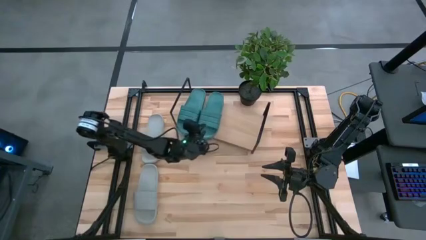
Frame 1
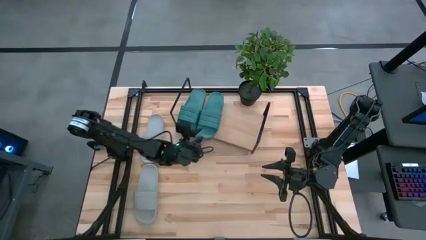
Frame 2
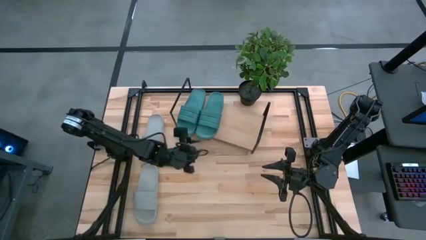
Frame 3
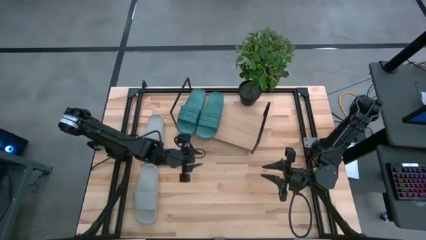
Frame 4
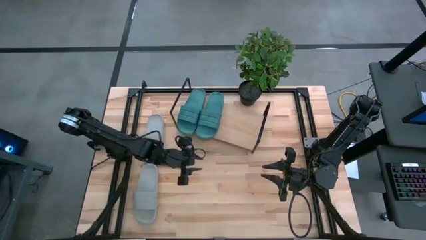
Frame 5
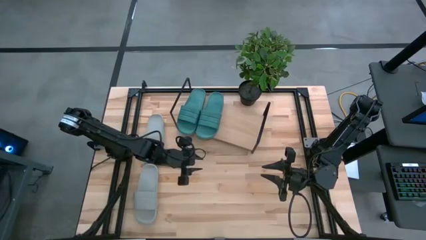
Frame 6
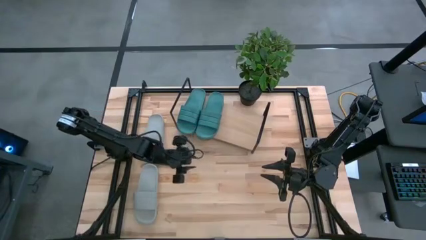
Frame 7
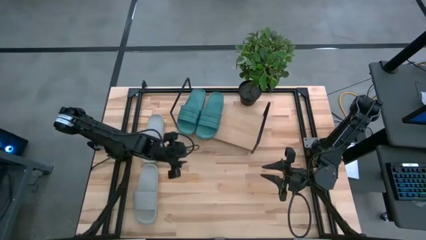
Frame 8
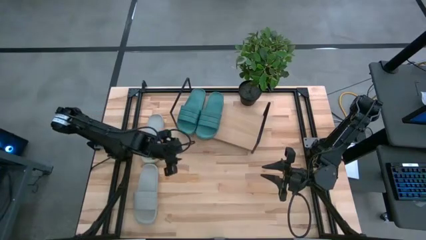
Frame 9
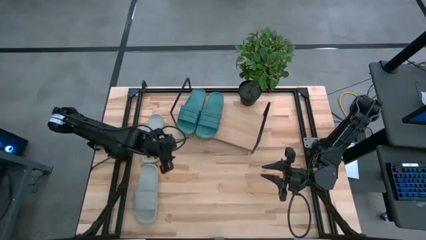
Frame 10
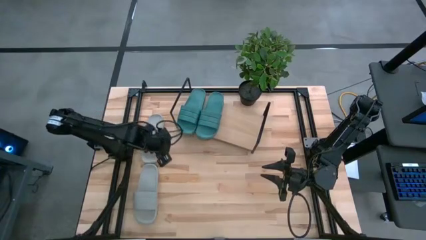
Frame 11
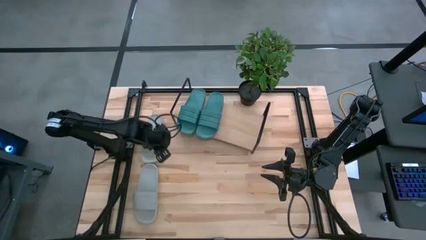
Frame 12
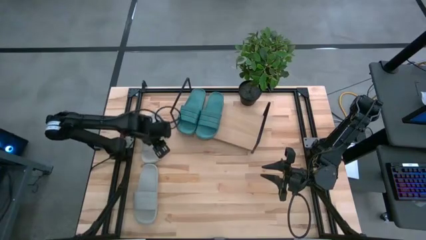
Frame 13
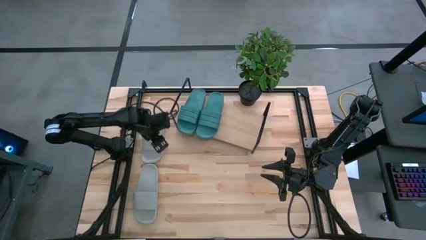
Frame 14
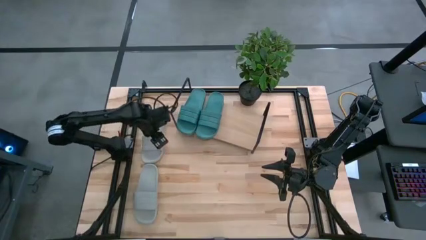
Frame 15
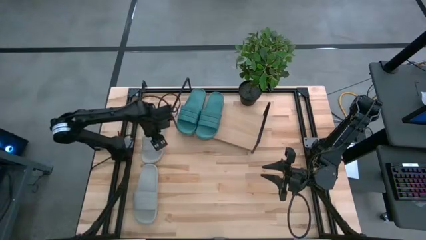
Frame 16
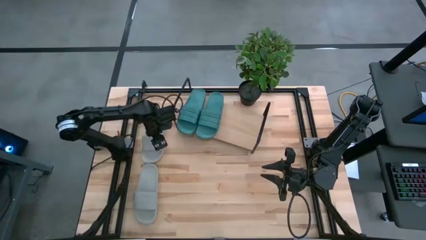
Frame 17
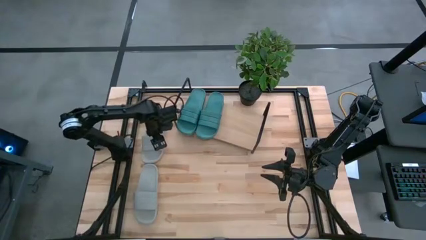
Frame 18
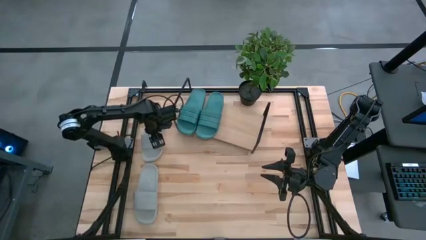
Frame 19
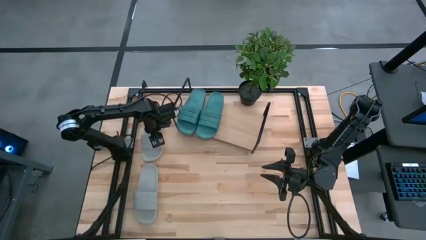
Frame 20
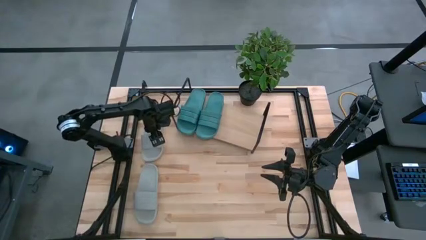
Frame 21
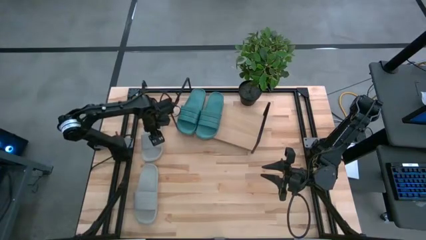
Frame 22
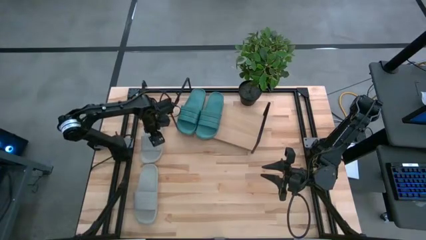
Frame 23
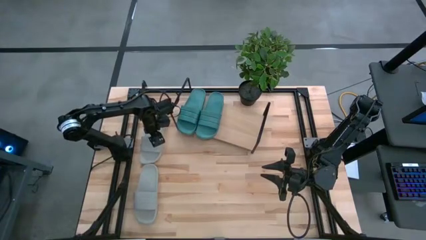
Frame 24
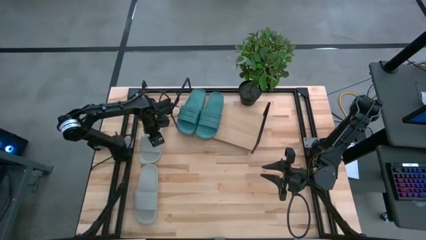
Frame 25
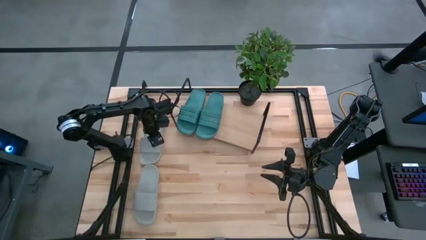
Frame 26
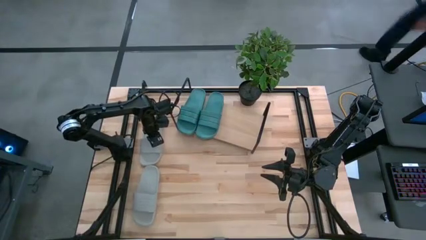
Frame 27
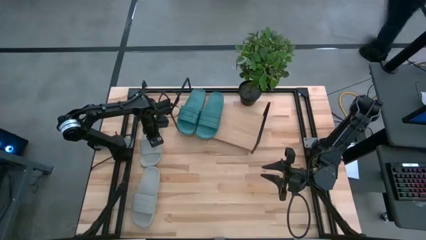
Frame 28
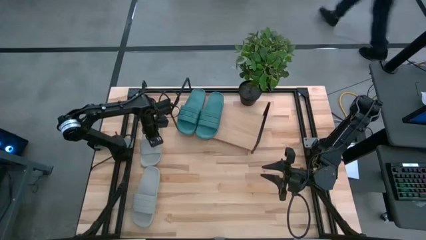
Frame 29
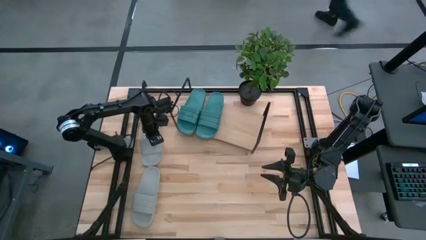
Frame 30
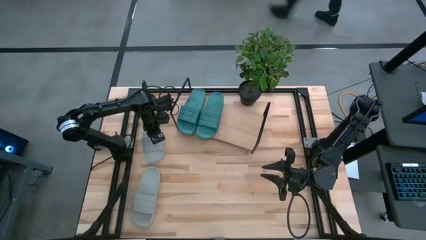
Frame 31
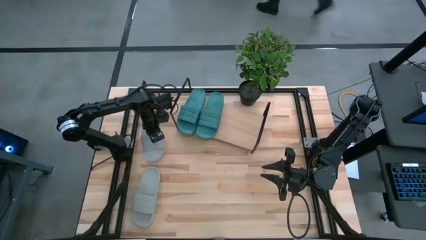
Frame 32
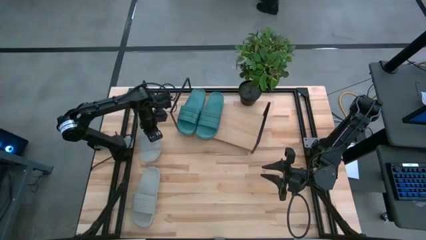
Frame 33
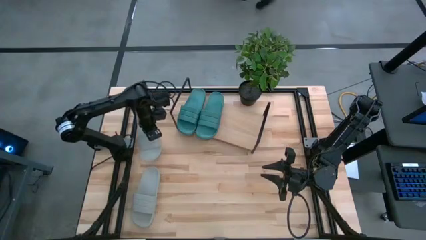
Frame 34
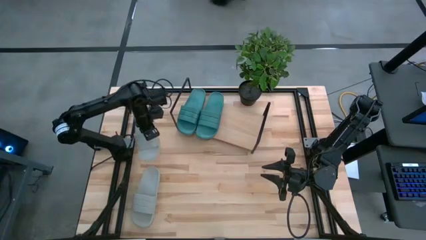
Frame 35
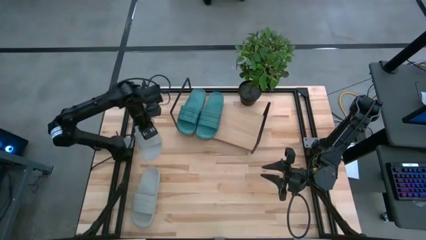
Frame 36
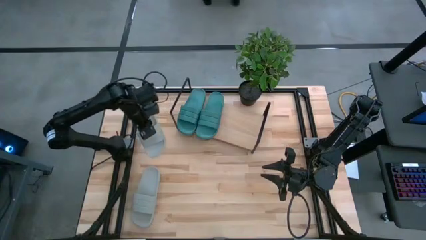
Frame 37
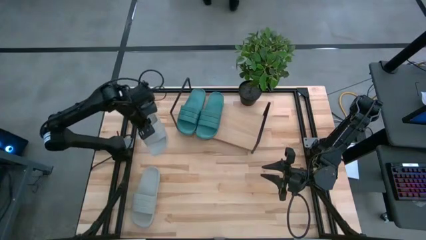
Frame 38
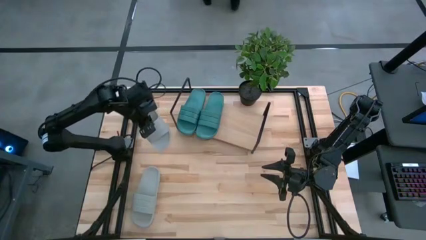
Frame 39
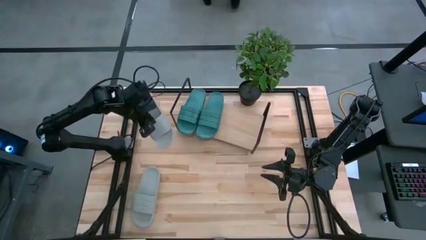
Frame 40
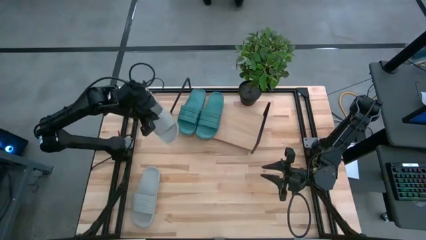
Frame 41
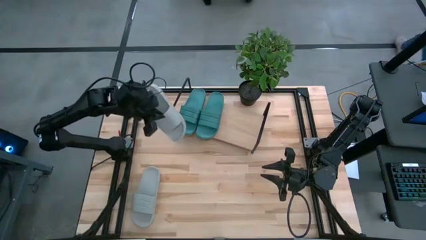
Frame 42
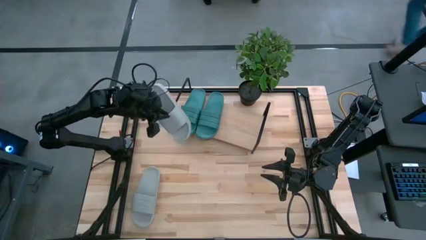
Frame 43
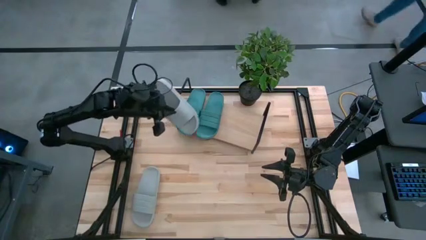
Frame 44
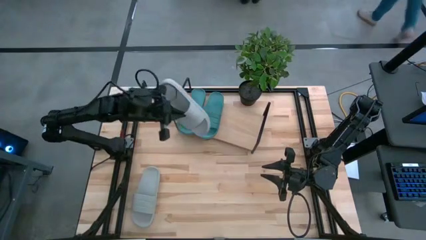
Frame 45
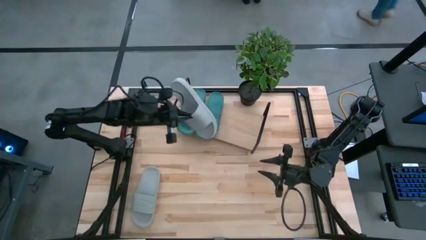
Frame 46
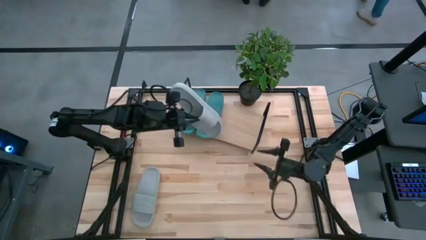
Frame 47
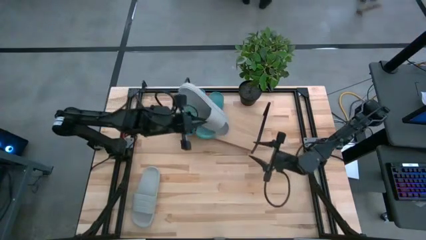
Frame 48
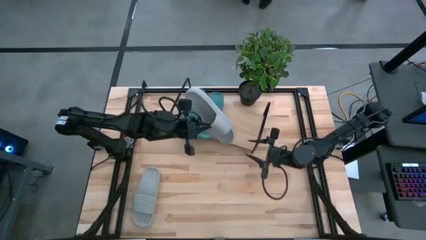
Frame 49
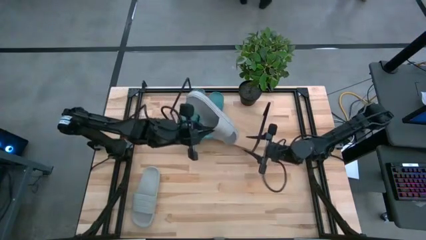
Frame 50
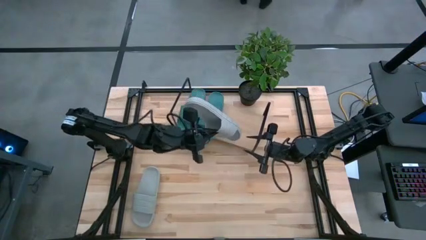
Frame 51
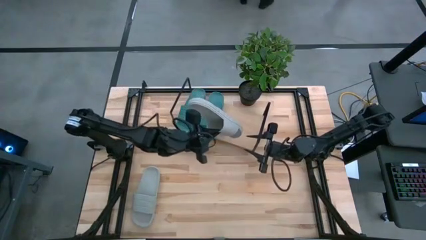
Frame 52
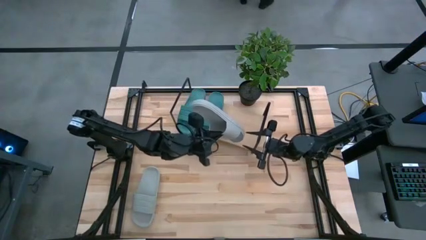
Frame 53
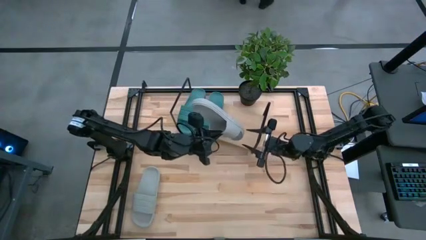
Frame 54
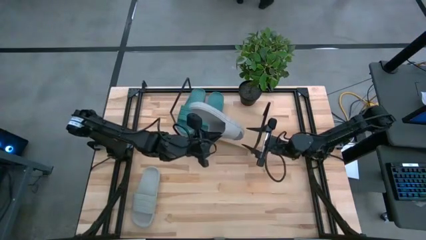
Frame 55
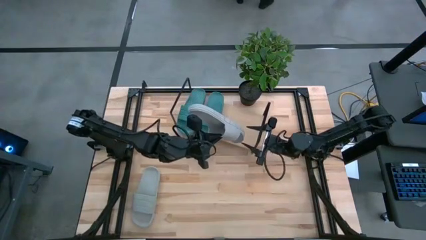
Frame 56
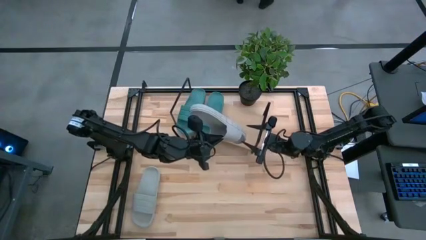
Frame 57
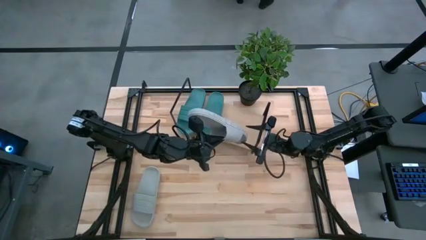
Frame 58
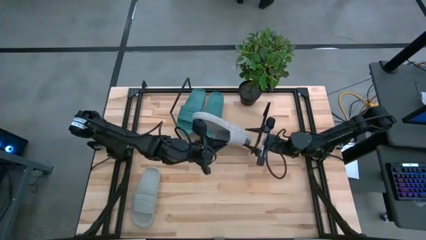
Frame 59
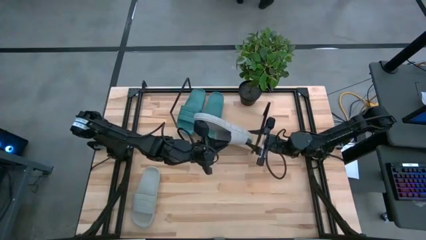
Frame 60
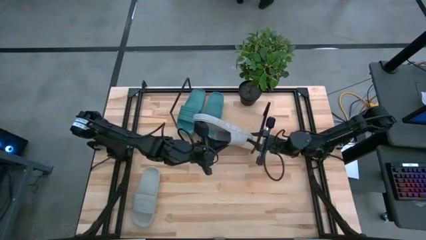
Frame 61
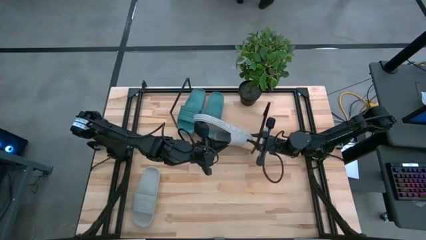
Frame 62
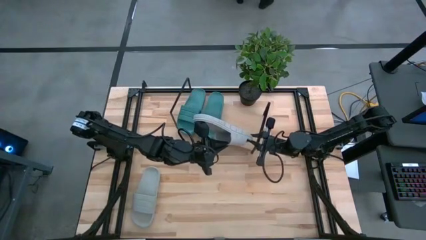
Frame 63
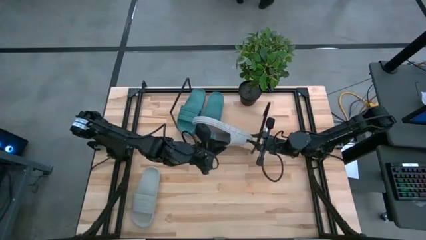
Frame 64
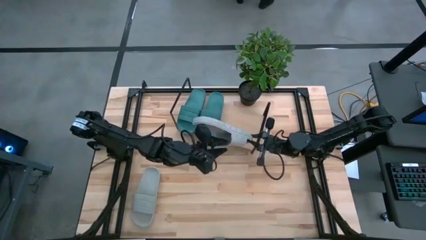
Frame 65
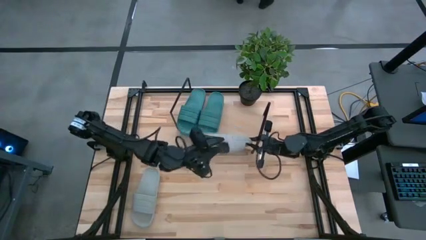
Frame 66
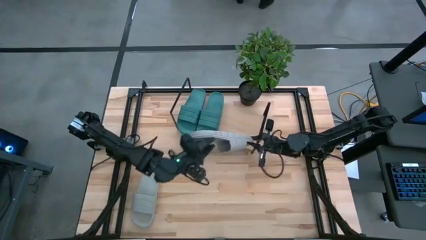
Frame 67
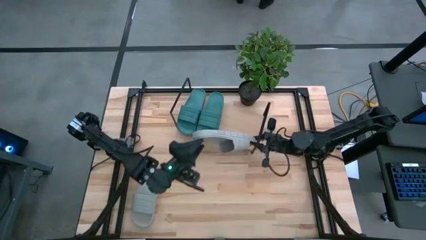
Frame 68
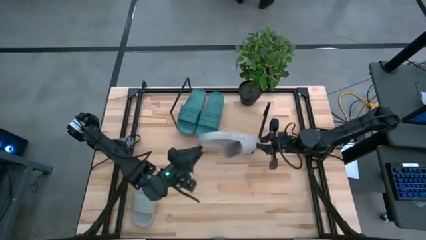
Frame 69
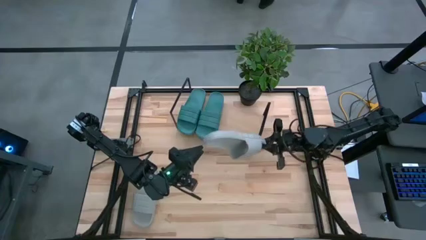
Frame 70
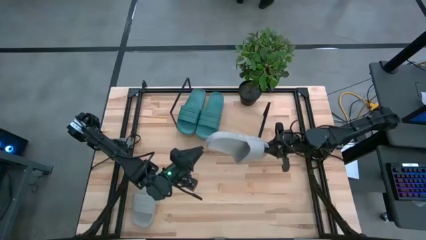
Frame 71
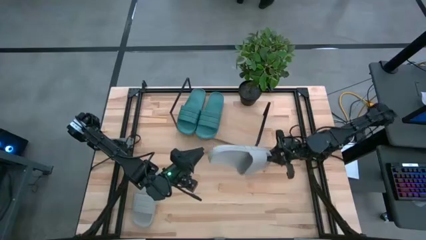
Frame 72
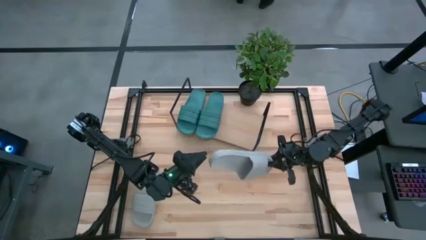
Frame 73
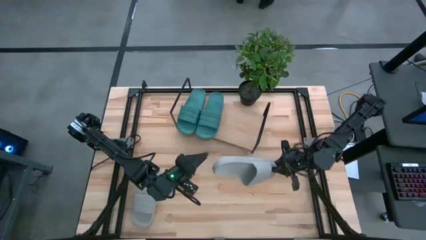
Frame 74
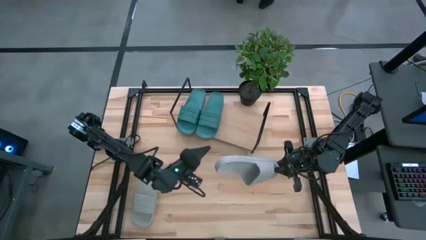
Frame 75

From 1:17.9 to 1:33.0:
Task: Pick and place slides into the shelf
Put the top gray slipper on the shelf
